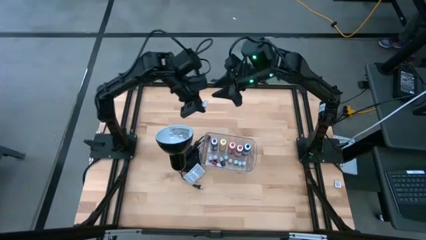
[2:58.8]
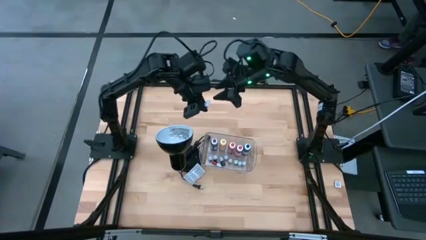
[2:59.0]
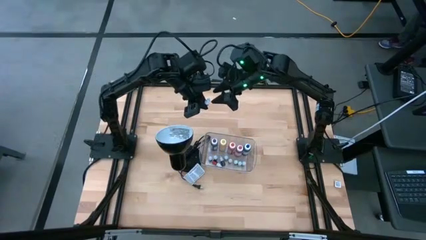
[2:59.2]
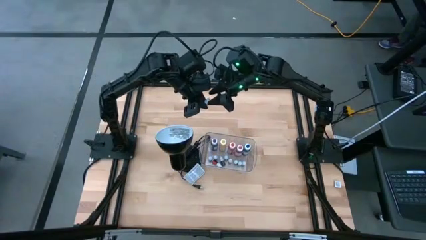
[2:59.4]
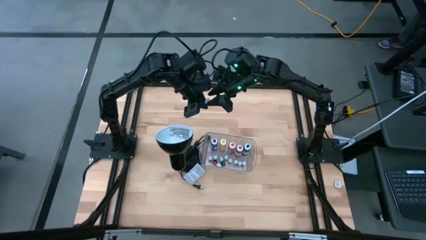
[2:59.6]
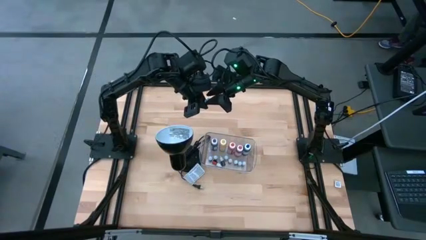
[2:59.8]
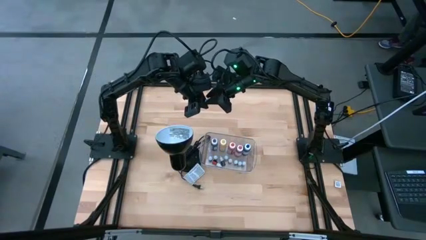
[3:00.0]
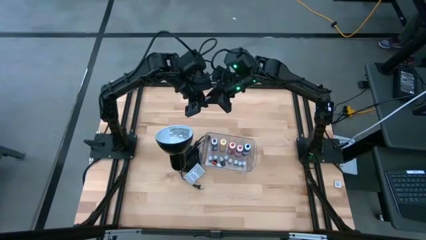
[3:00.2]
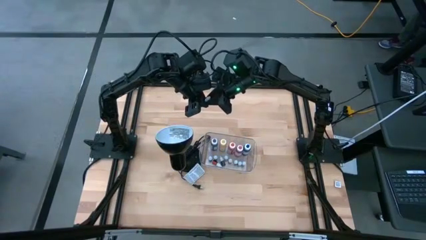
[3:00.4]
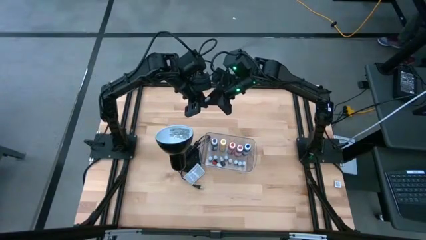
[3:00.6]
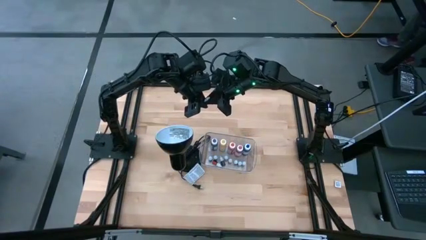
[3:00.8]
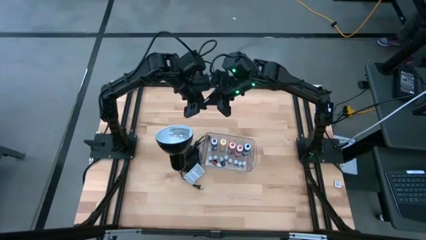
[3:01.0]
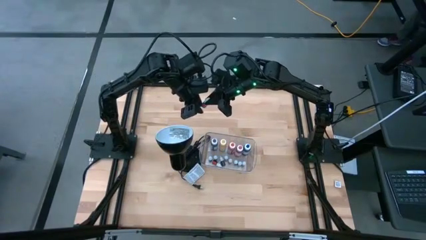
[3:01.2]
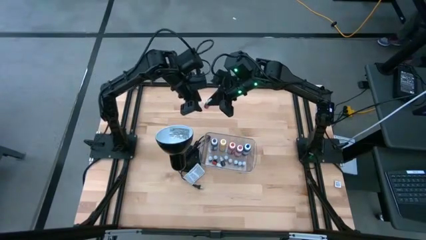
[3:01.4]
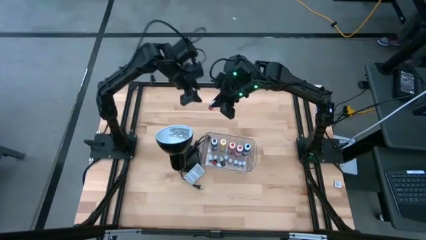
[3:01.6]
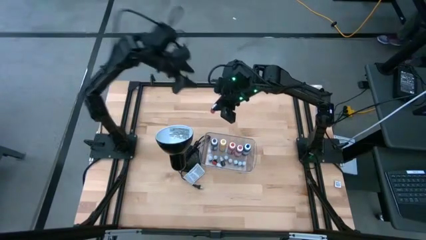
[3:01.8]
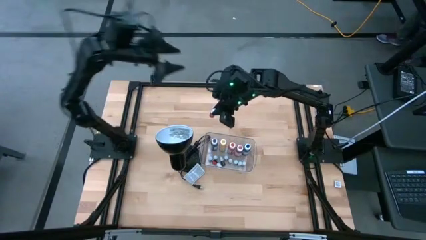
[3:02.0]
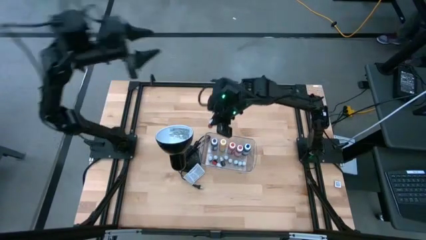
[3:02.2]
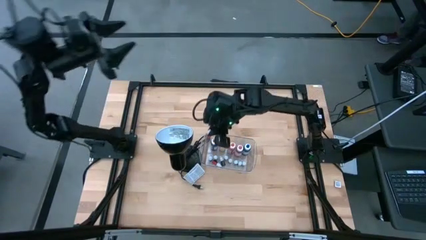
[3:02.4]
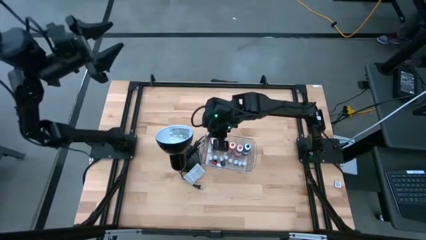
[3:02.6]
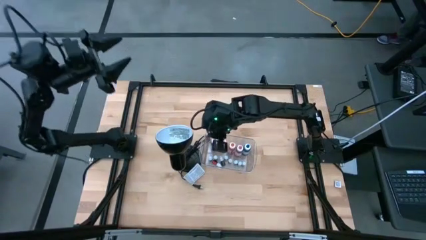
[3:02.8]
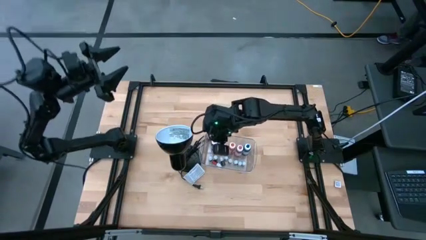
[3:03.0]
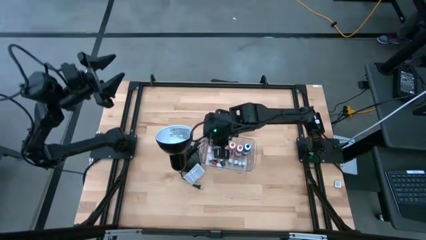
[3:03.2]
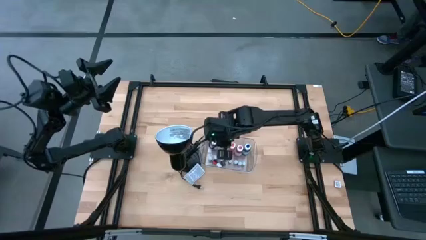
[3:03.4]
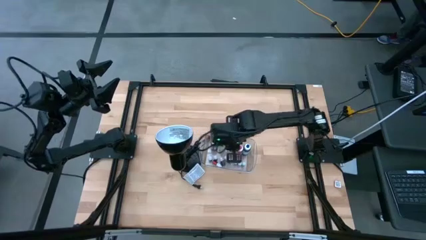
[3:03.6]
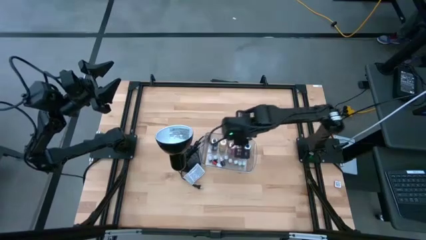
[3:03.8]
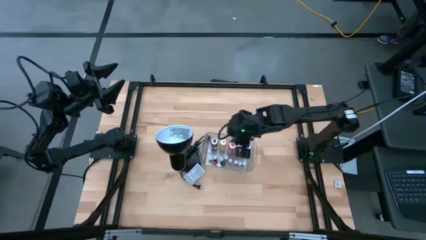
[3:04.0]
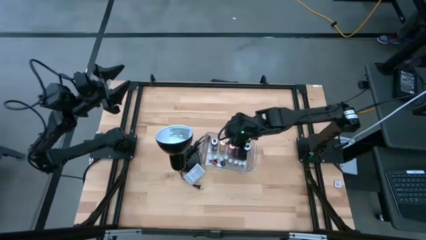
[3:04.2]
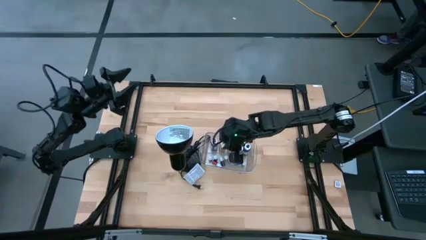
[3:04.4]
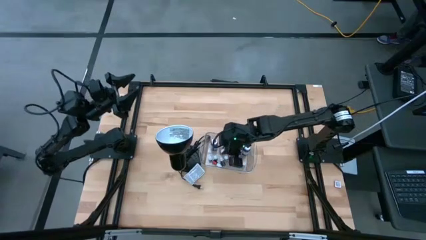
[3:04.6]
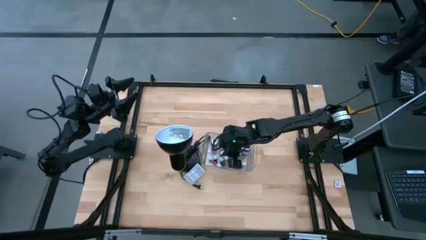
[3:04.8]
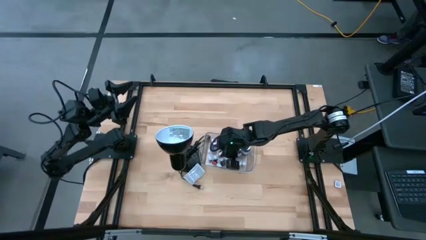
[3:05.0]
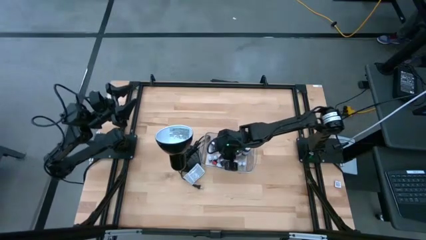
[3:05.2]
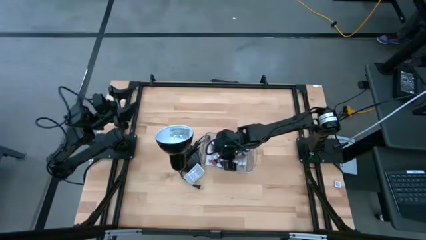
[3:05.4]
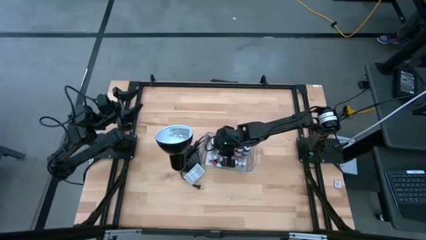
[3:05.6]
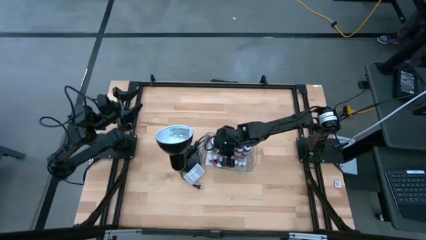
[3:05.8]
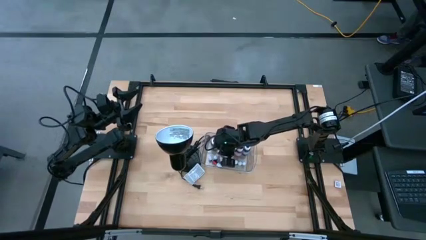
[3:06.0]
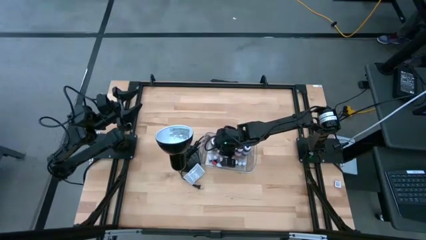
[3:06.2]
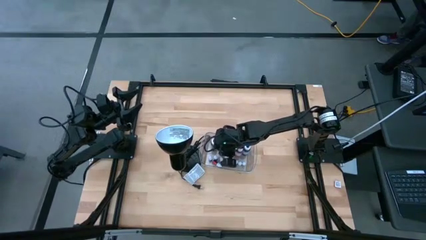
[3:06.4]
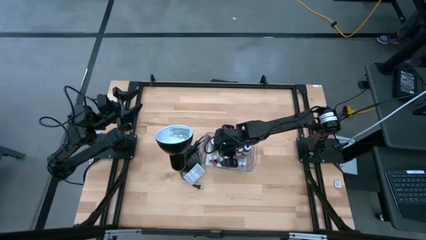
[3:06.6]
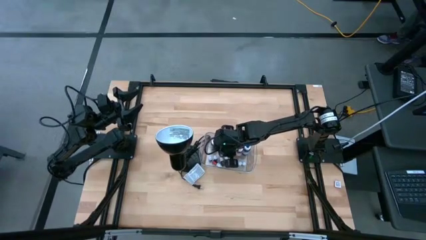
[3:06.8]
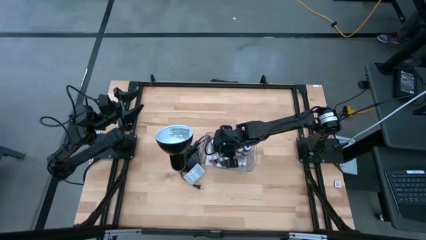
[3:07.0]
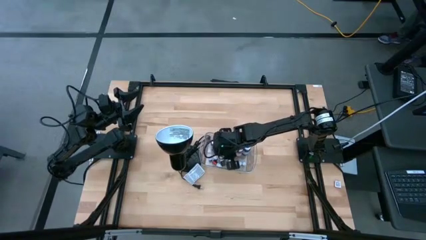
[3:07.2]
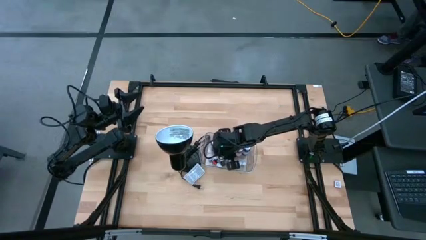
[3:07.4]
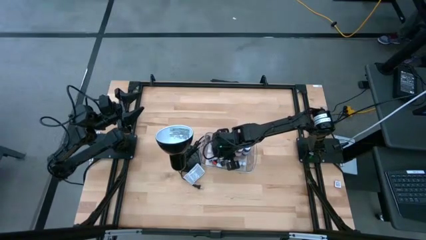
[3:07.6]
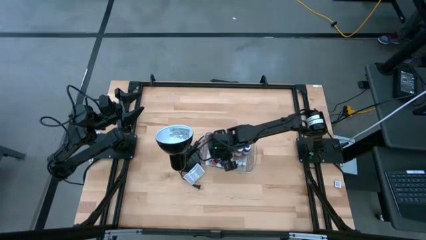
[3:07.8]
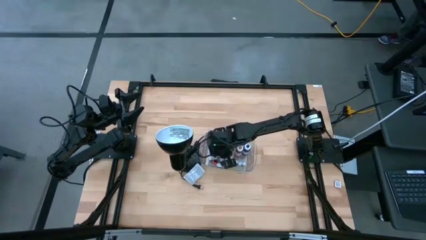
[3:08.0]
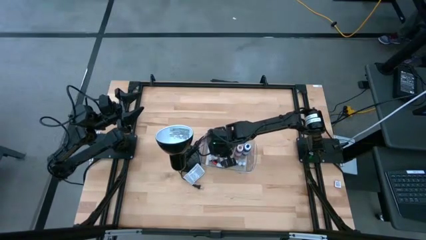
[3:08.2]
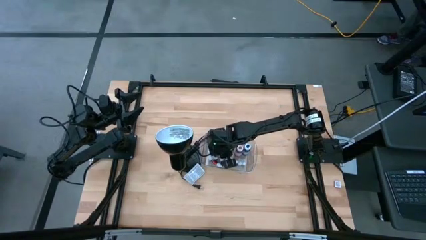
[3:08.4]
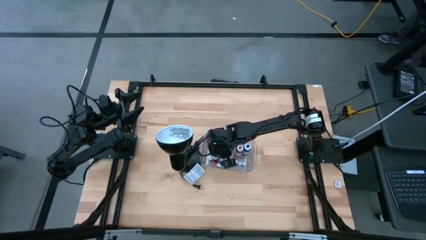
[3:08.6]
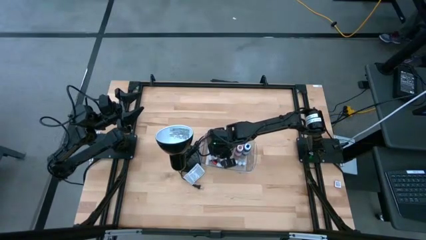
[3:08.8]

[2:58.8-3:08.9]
Task: Pick & Place food coloring
Put the small red food coloring bottle into the transparent bin

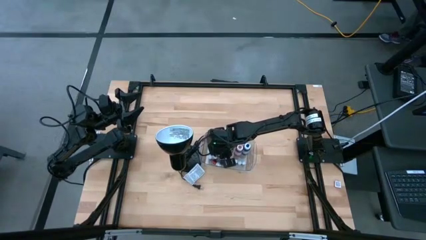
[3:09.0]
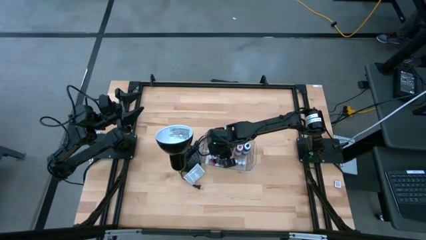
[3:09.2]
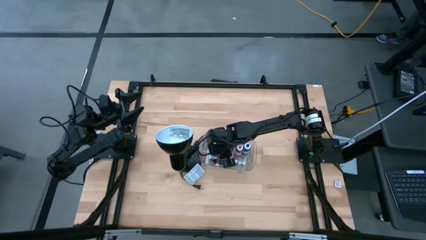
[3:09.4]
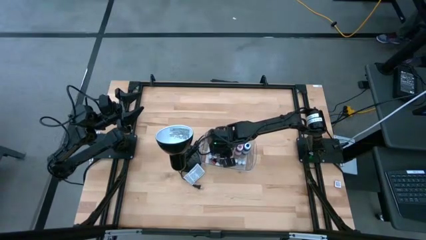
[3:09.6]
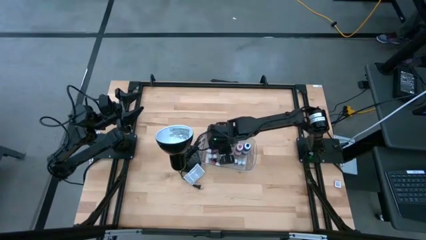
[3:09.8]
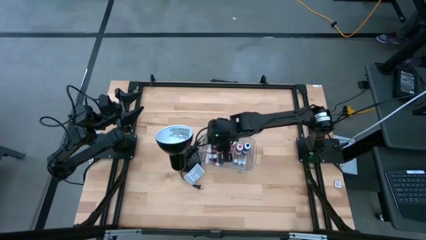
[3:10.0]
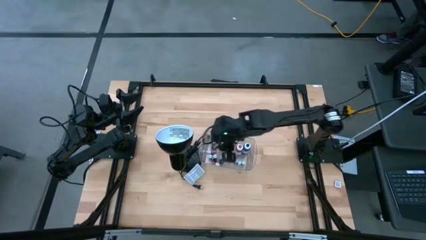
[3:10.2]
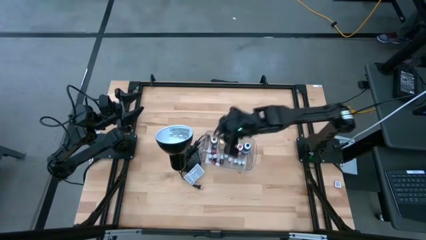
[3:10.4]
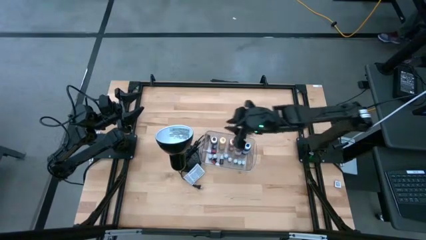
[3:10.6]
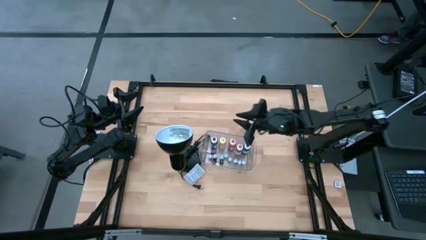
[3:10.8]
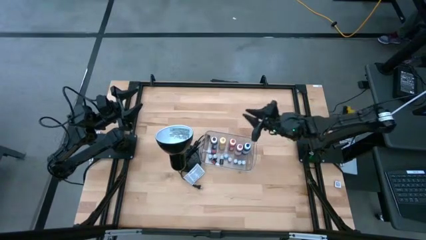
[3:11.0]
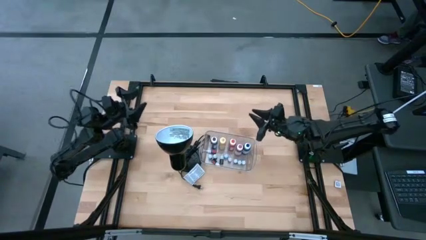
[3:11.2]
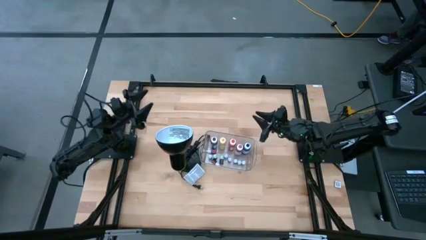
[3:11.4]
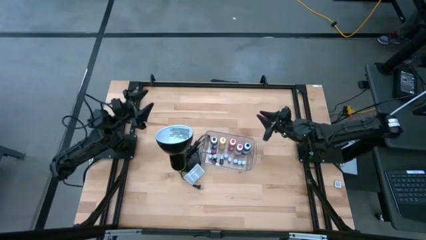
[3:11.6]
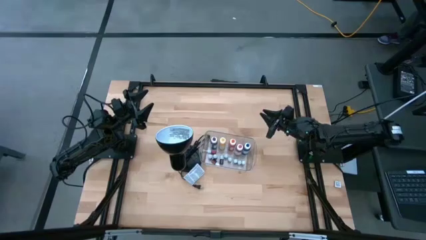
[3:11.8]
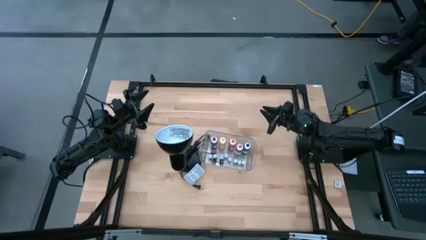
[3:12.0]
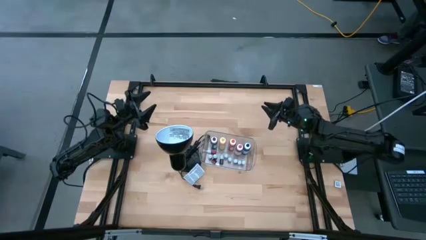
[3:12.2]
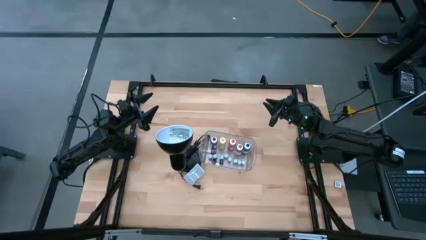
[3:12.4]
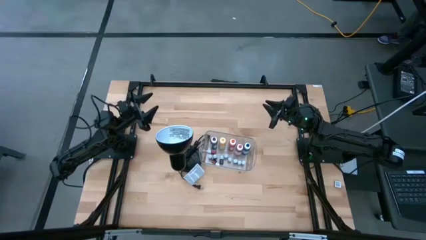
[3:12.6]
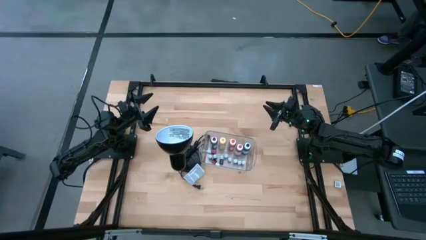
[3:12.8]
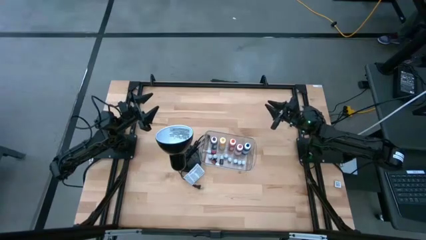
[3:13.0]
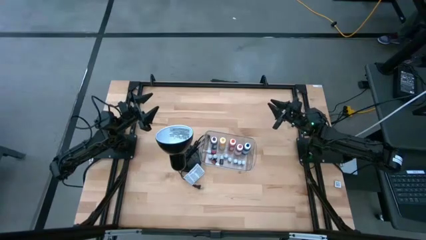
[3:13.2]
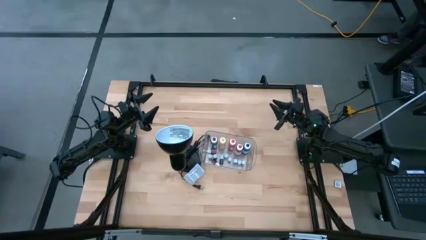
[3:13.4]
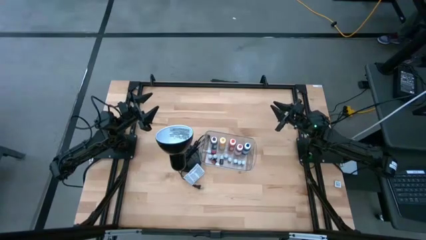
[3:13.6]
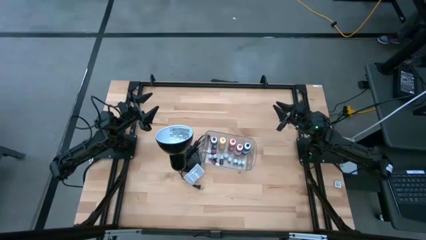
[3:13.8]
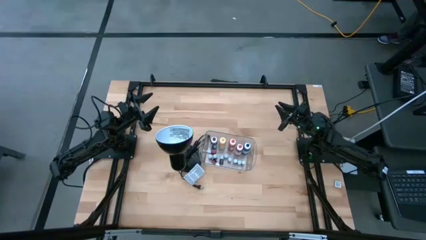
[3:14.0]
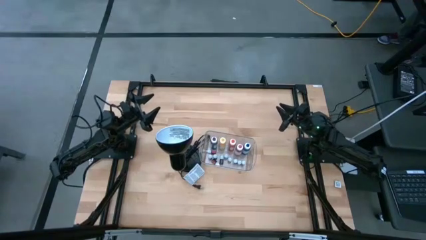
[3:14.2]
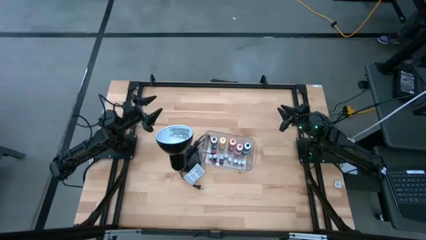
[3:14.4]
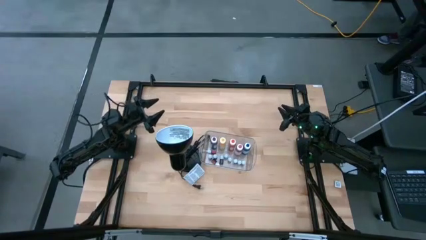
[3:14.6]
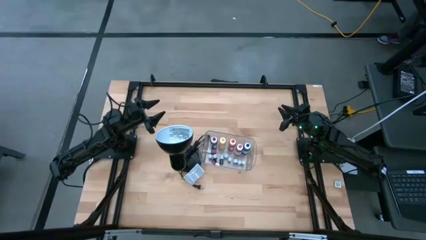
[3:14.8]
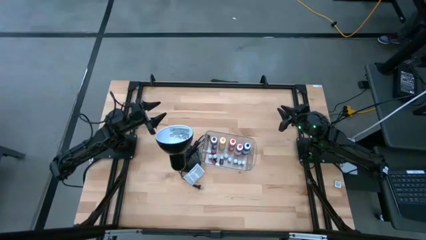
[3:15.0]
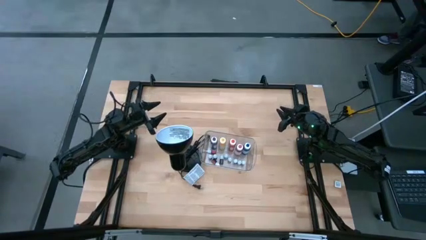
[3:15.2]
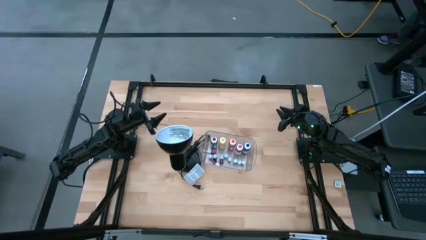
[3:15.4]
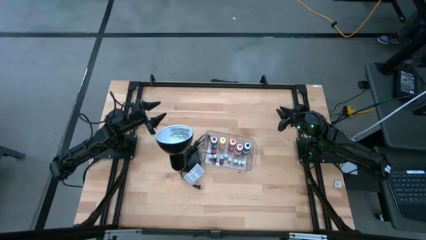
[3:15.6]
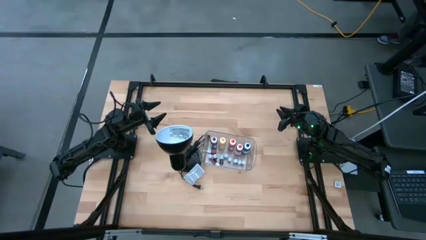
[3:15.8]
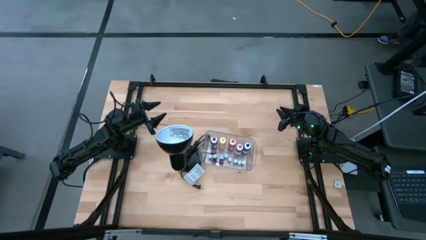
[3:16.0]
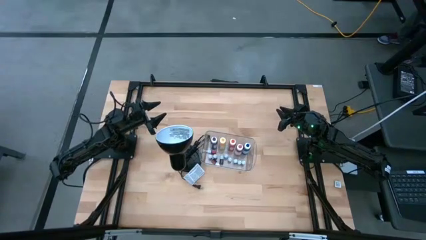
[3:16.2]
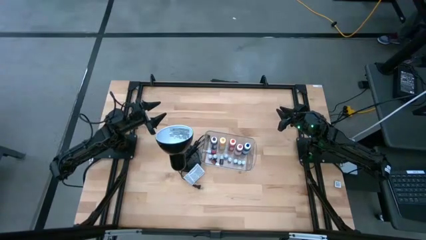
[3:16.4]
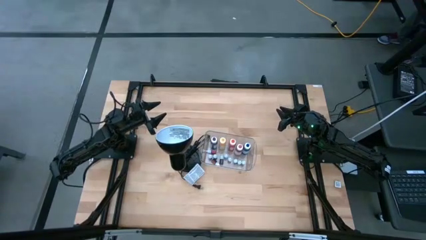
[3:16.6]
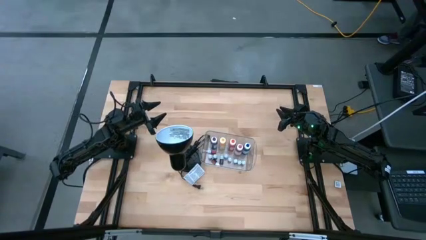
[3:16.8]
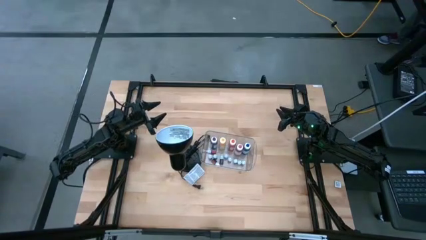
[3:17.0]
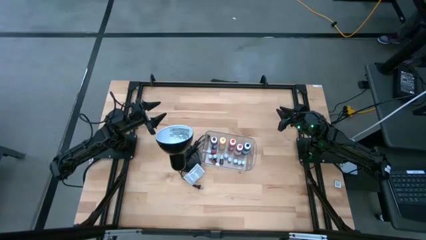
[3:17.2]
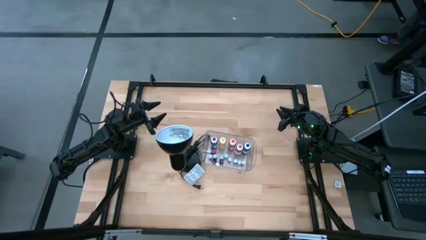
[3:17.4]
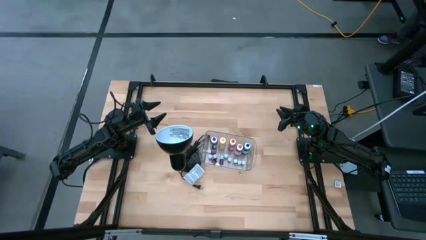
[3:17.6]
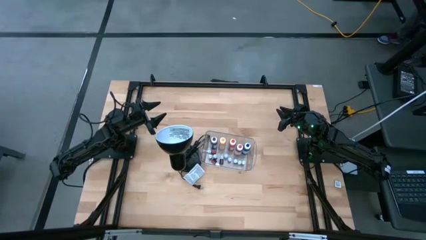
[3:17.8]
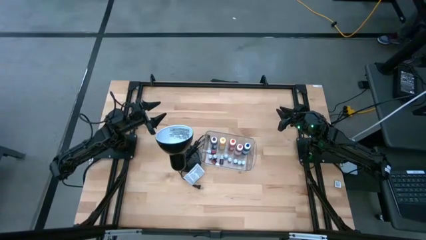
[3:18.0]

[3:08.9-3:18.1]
Return to Home Position
